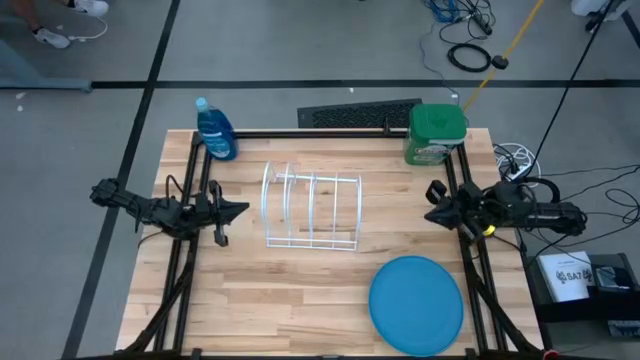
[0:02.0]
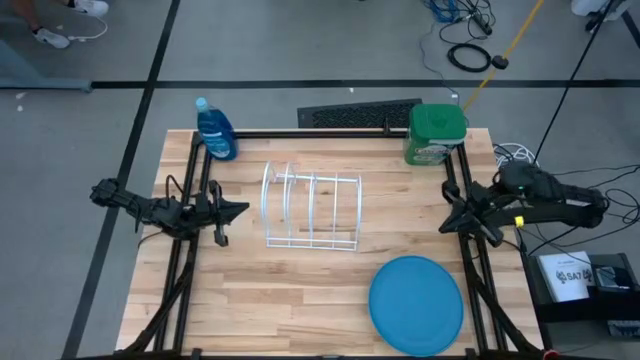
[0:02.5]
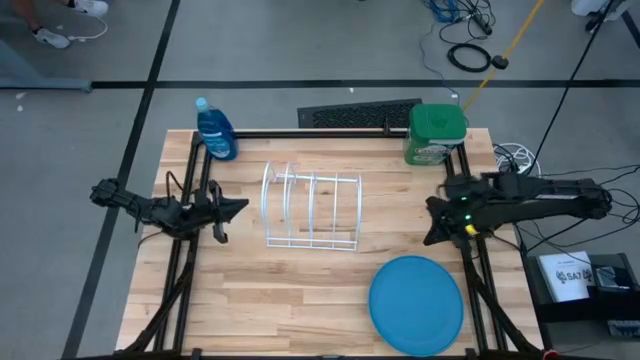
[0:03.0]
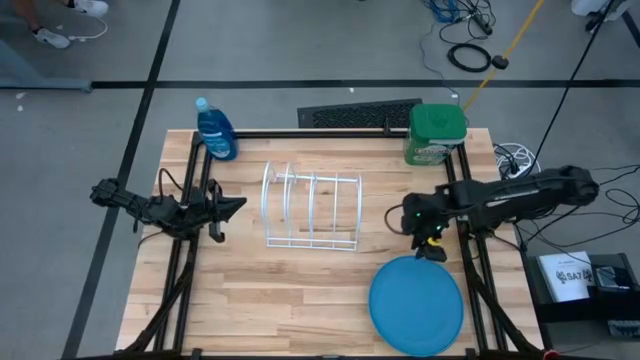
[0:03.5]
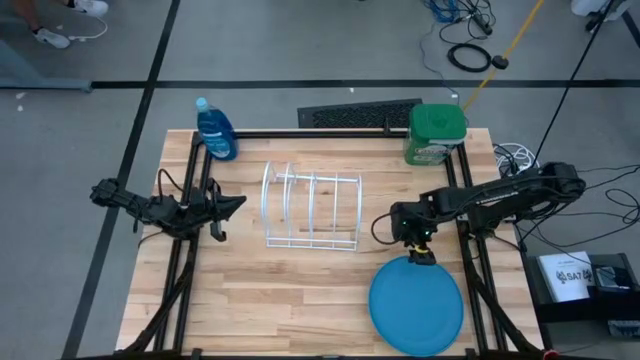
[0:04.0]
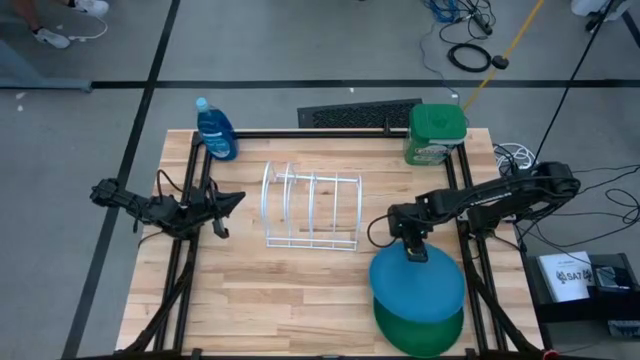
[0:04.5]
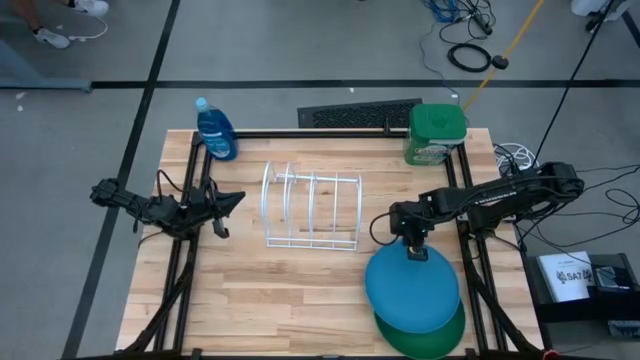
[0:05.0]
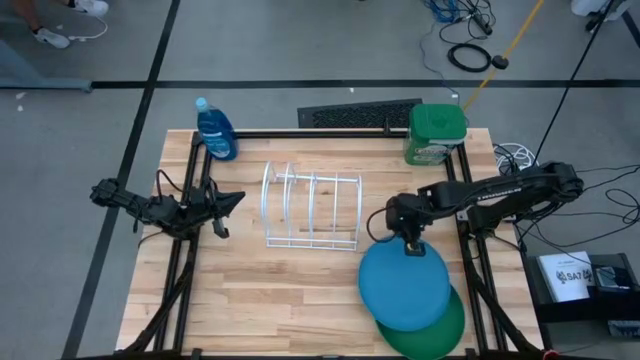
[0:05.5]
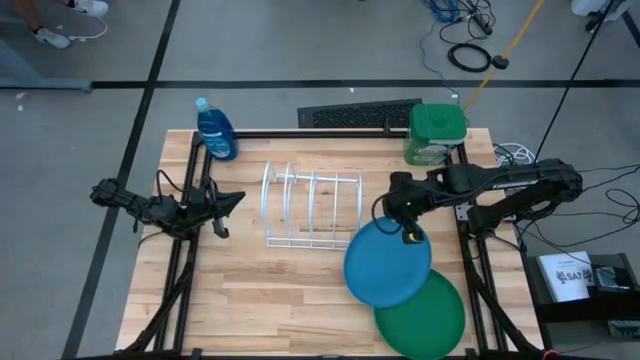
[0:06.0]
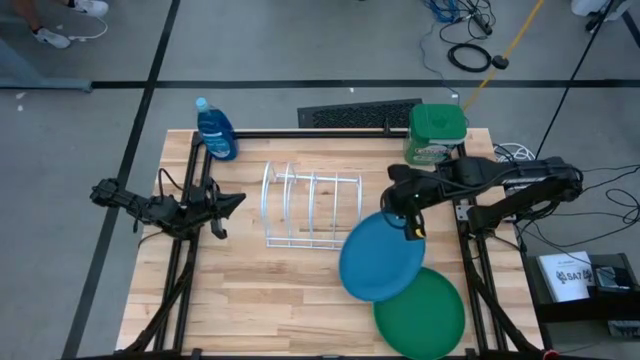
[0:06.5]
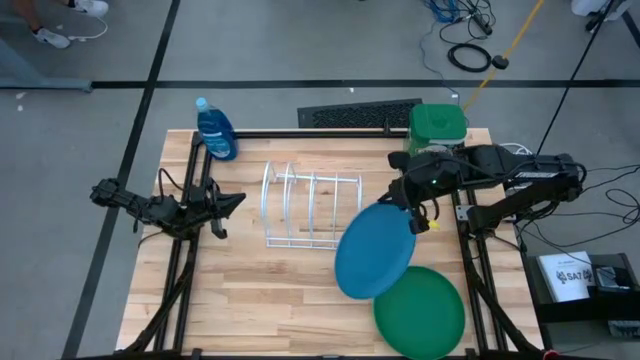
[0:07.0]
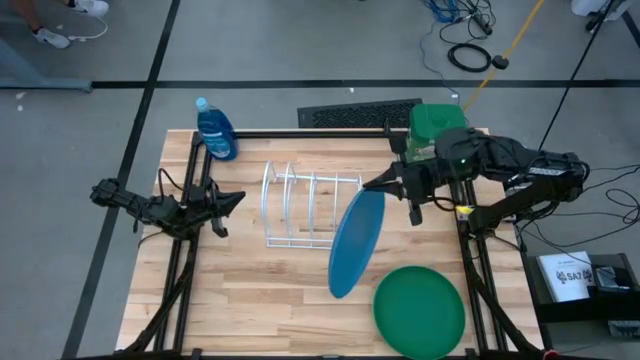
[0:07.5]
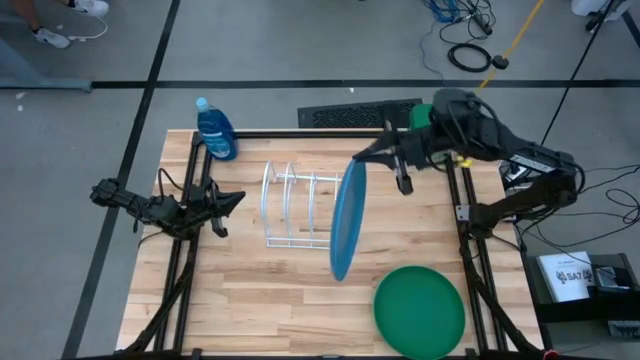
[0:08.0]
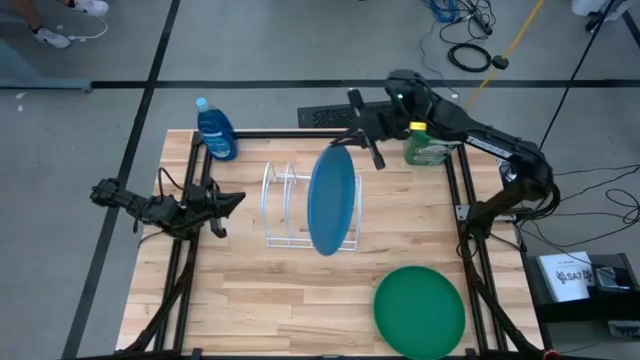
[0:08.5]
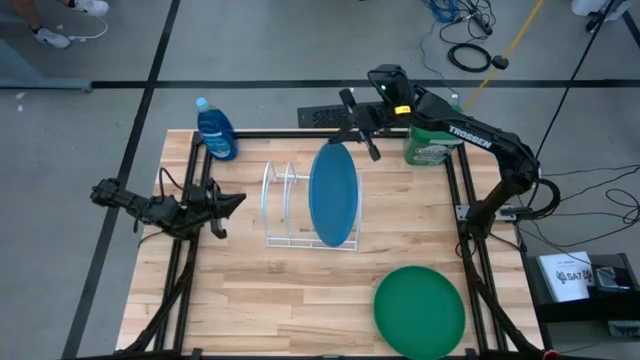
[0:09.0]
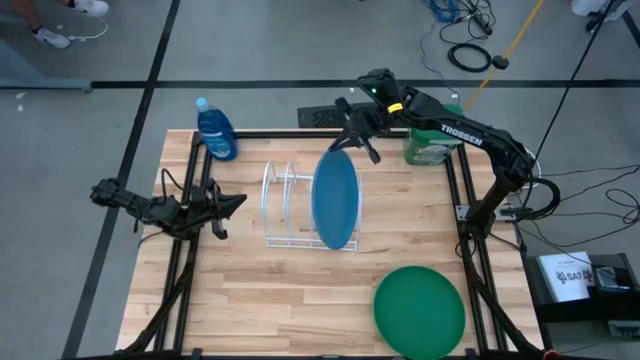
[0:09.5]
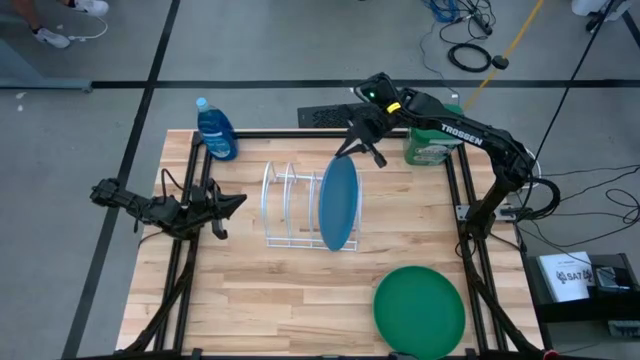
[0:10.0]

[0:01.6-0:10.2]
Task: Sort dishes
Put the blue plate into the white dish rack

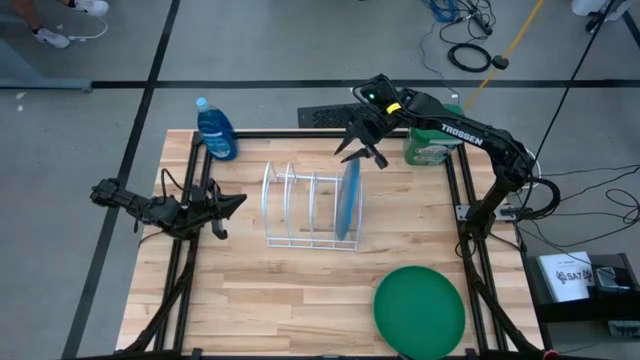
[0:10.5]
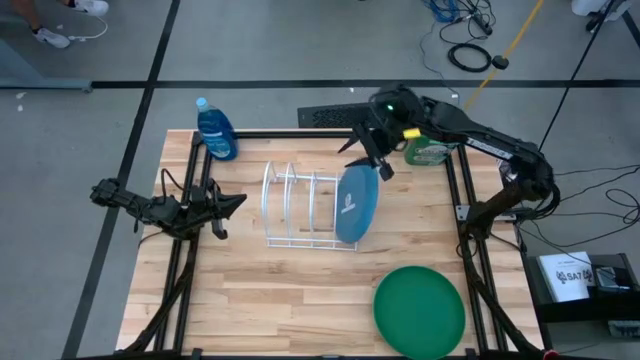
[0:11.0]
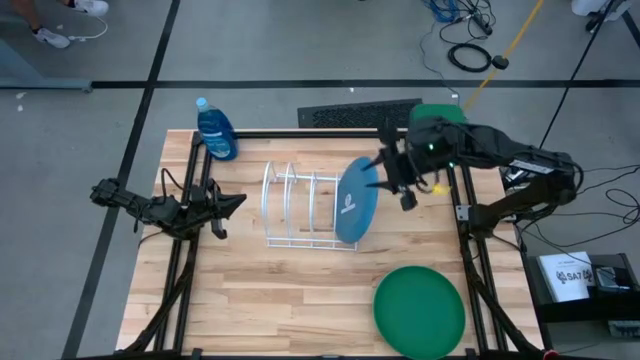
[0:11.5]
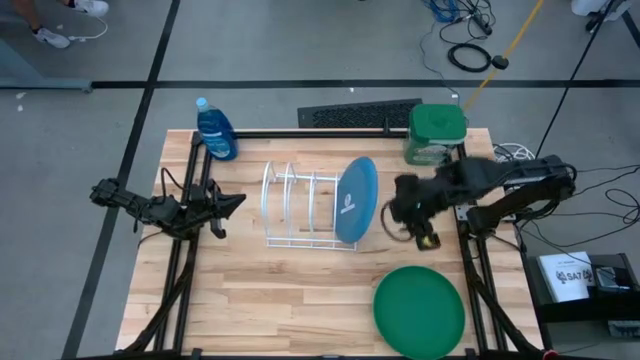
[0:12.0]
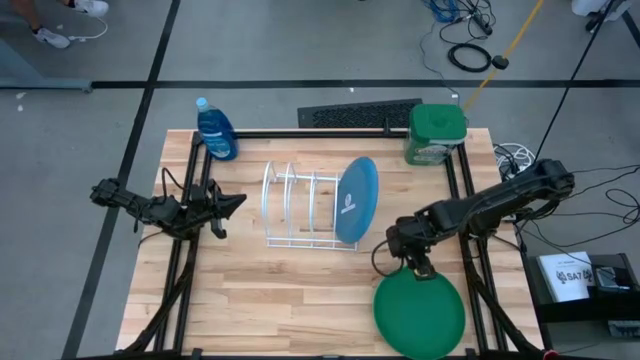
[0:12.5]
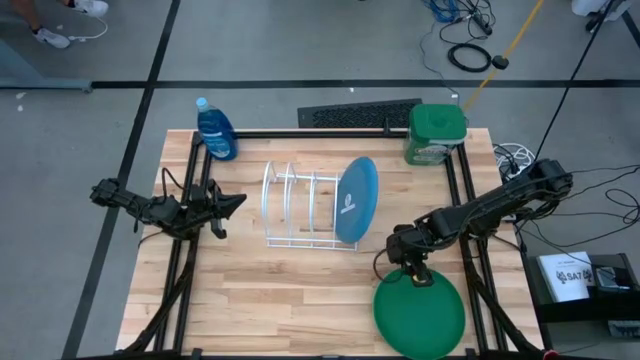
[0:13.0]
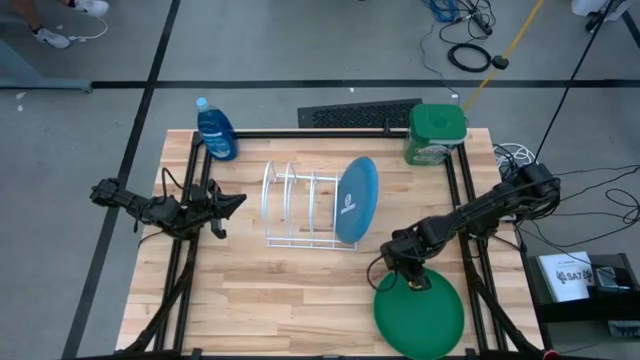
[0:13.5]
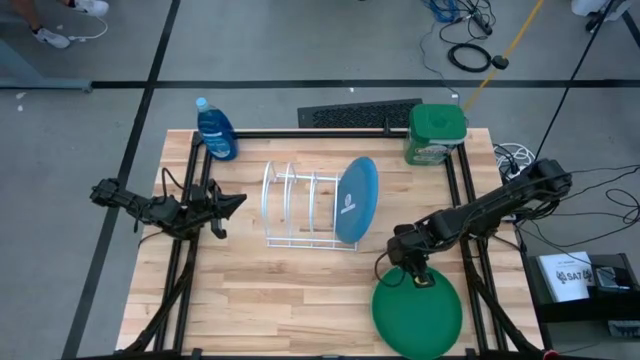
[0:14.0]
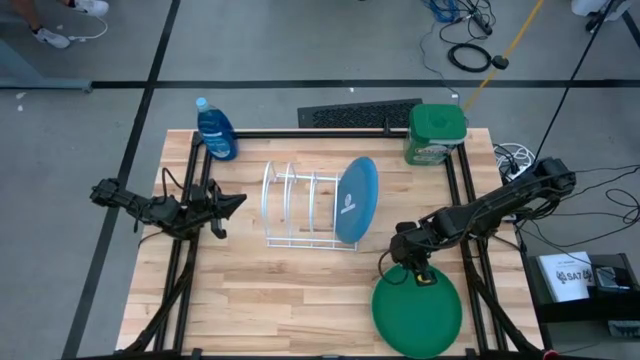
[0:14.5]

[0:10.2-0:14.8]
Put the green plate into the white dish rack

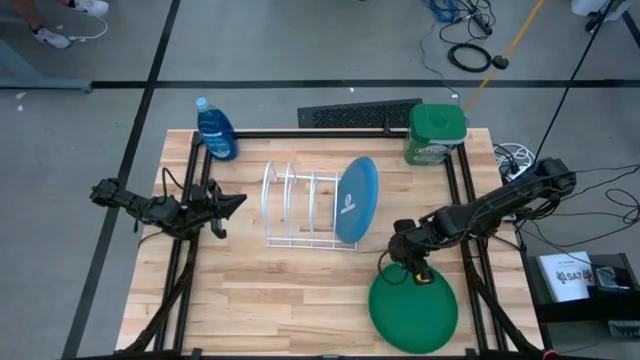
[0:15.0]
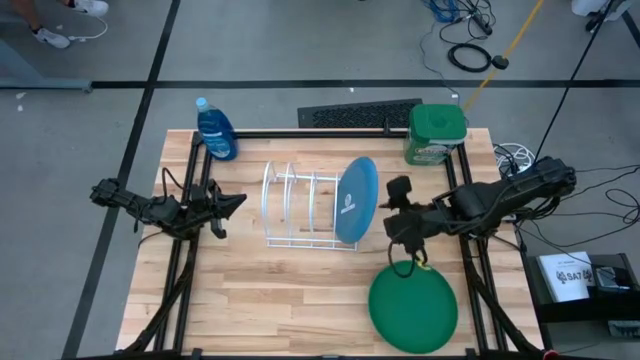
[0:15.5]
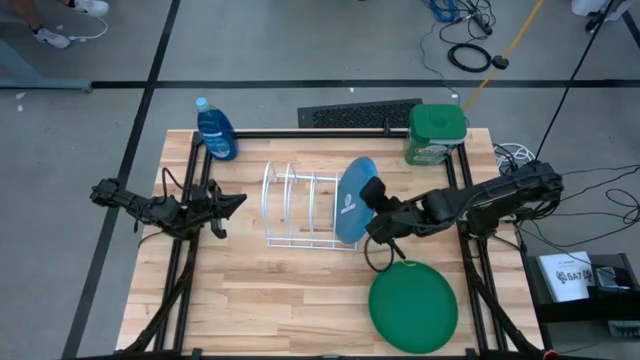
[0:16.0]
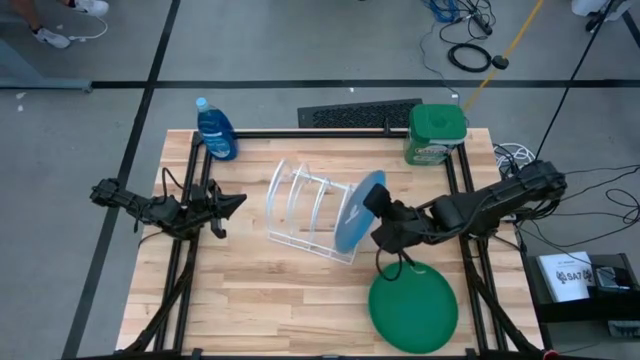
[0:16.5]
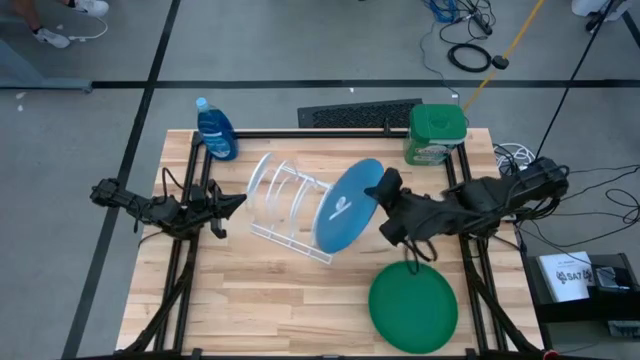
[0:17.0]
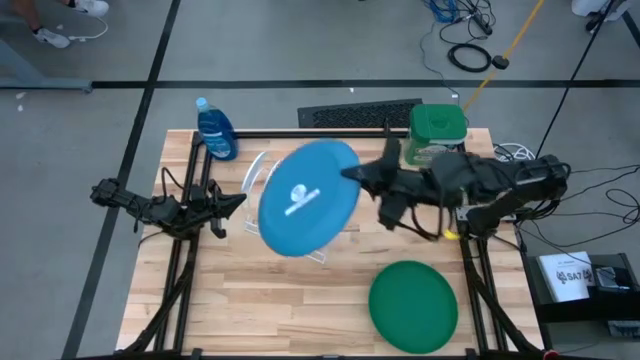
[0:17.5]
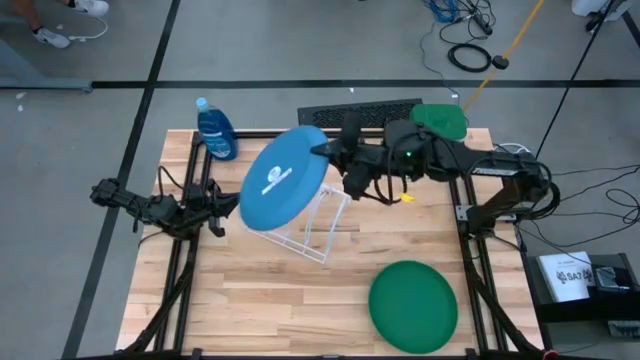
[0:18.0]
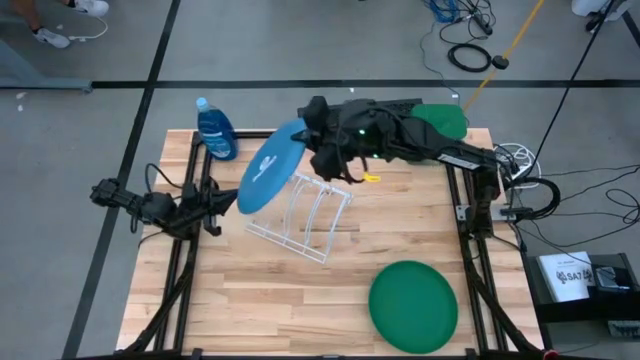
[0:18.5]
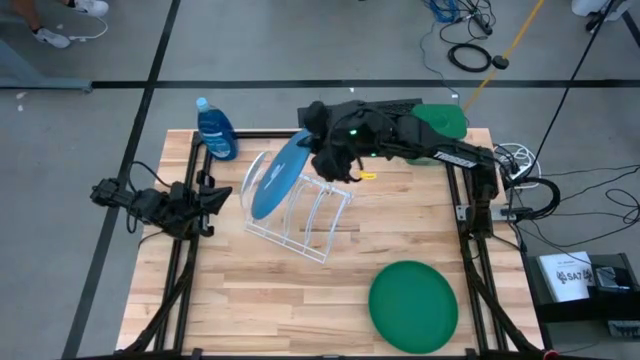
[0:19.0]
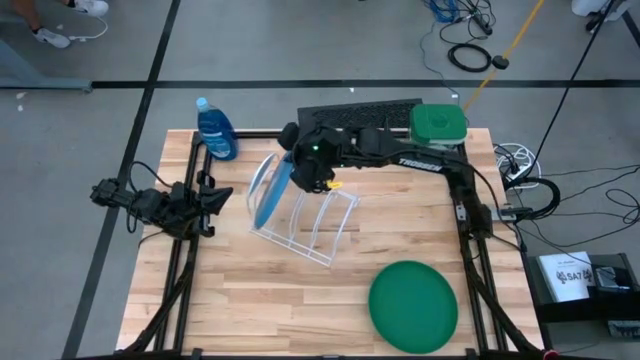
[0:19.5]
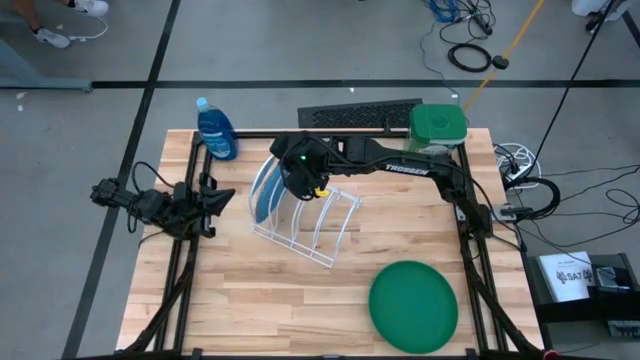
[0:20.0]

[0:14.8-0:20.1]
Move the blue plate to the left slot of the dish rack

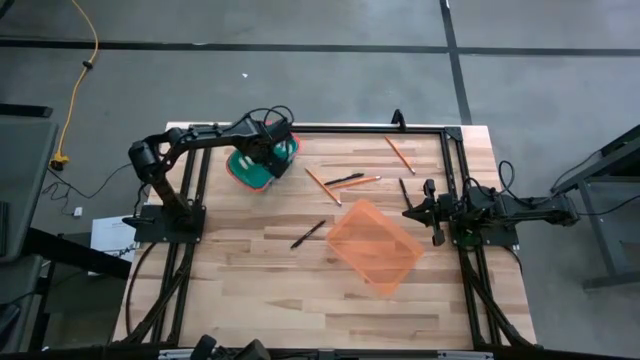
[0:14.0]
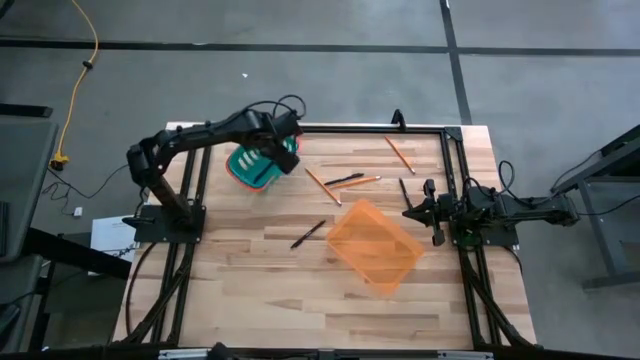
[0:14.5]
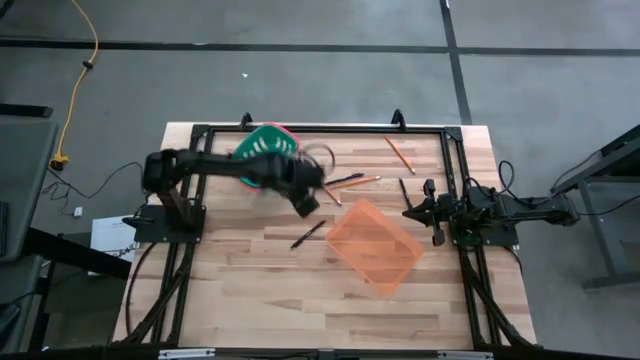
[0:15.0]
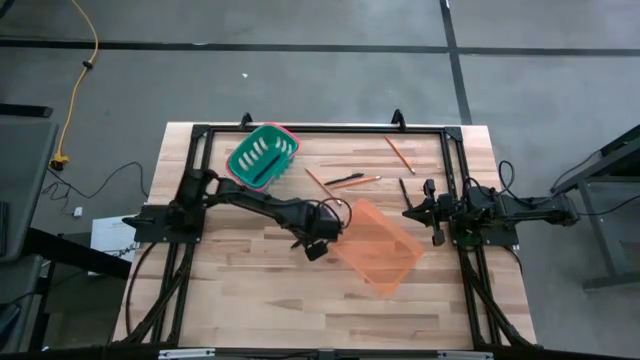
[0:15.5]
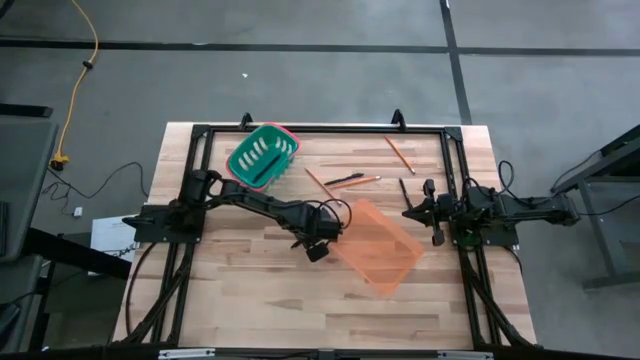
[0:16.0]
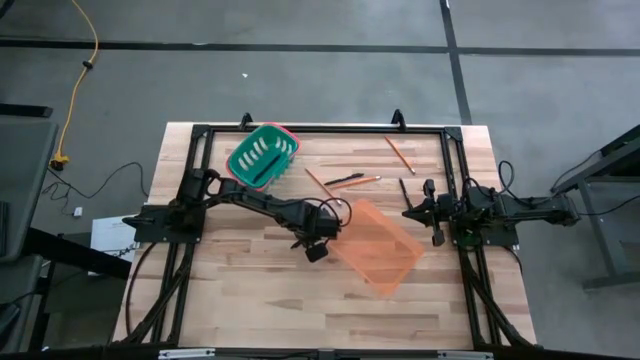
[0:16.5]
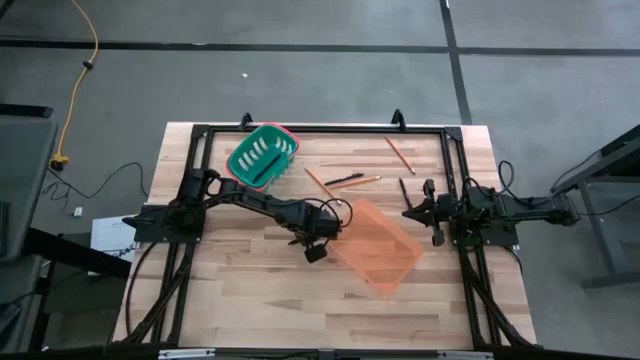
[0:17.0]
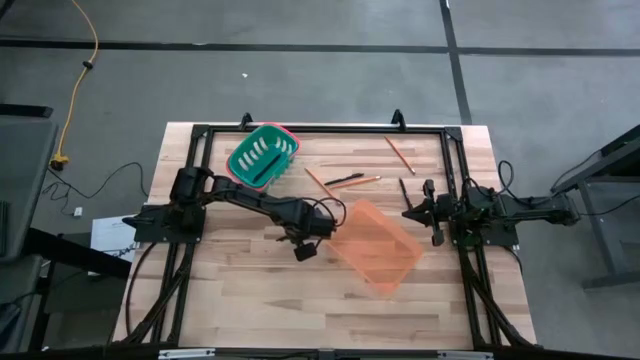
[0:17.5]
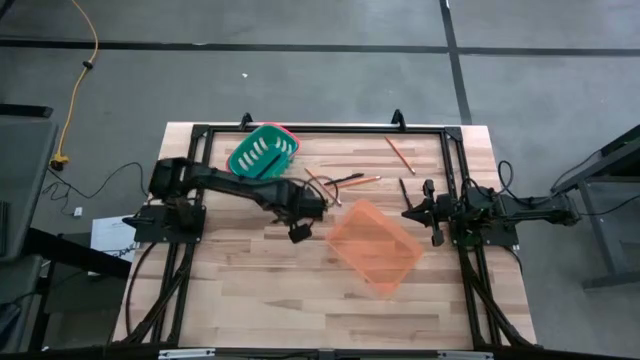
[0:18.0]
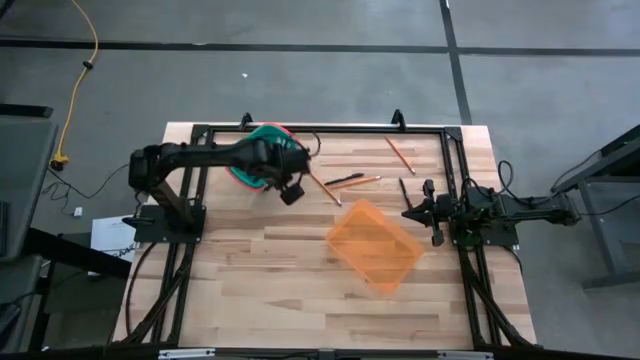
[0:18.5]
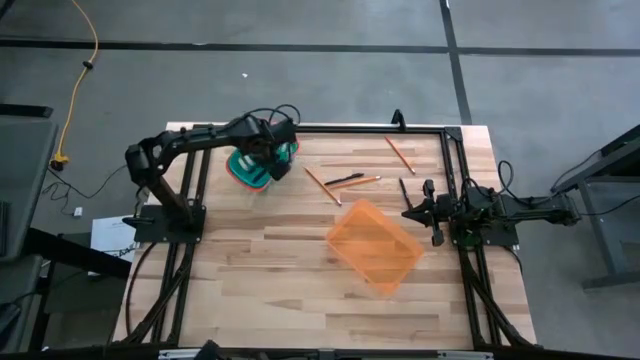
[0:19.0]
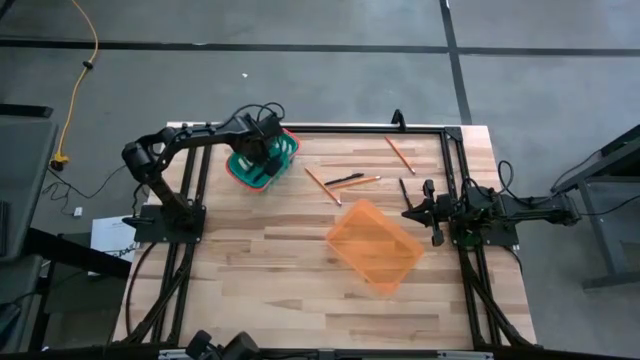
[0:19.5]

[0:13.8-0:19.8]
Task: Sort pens & pencils
Put the black pen into the blue bin
